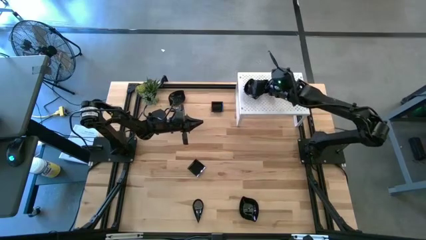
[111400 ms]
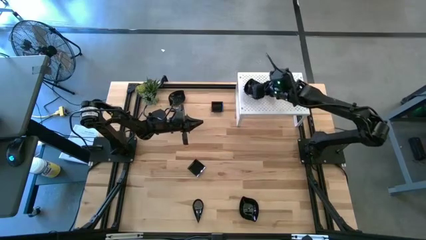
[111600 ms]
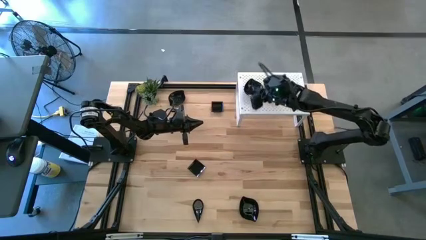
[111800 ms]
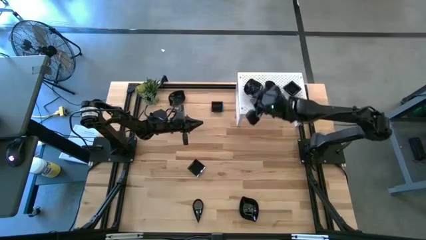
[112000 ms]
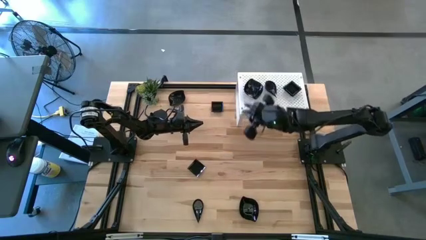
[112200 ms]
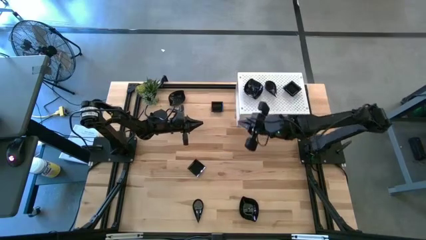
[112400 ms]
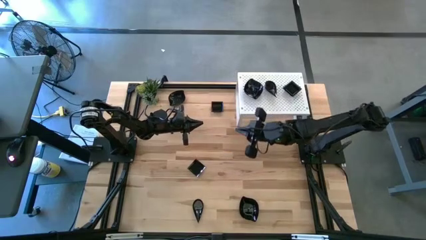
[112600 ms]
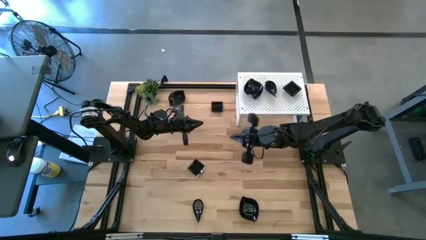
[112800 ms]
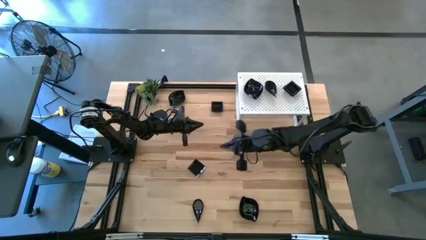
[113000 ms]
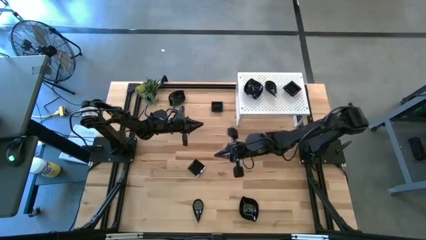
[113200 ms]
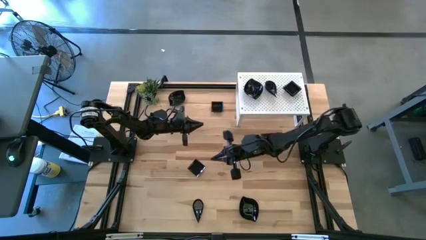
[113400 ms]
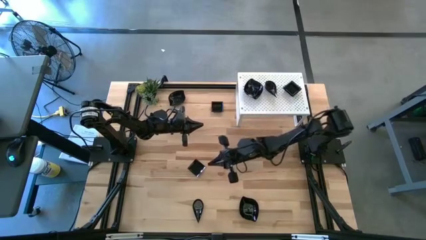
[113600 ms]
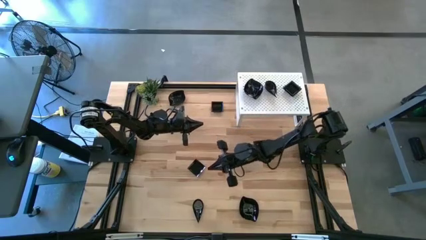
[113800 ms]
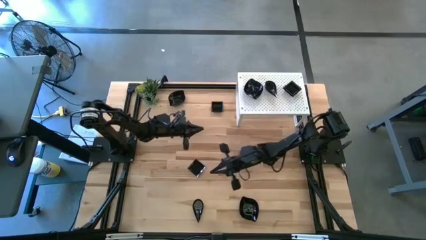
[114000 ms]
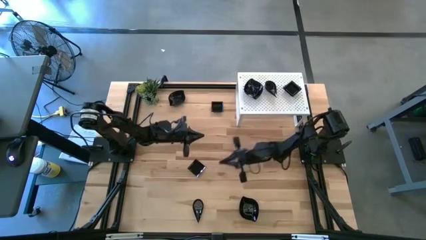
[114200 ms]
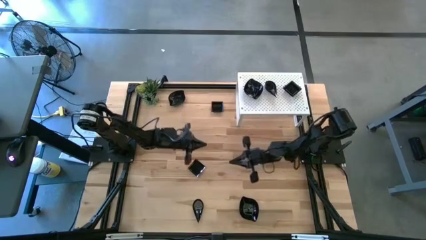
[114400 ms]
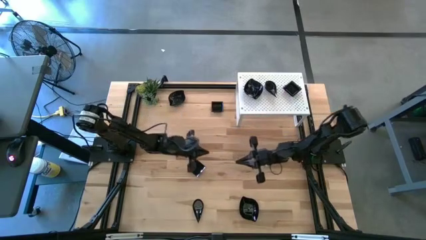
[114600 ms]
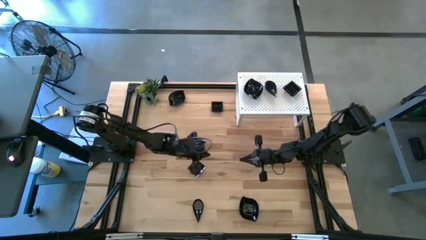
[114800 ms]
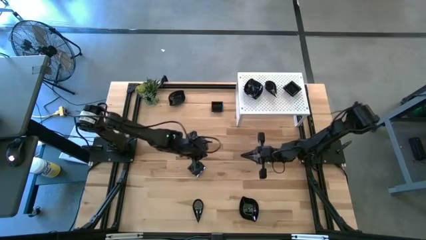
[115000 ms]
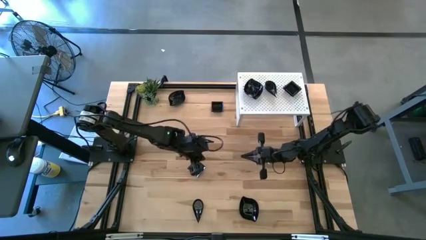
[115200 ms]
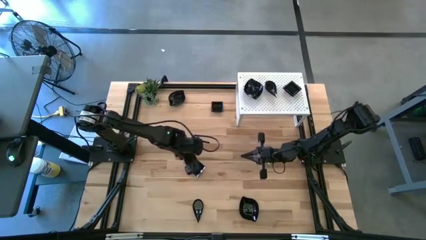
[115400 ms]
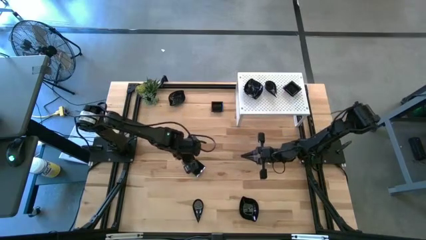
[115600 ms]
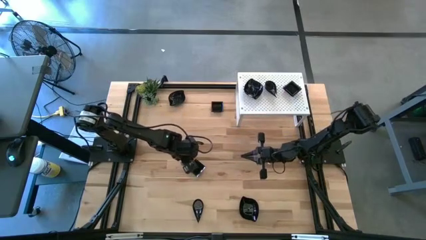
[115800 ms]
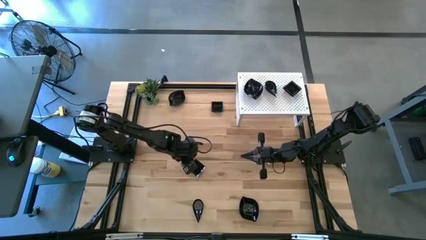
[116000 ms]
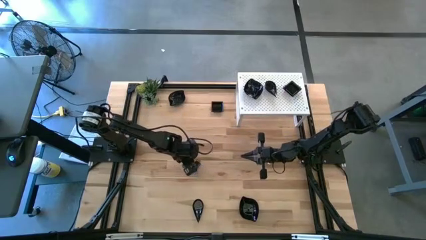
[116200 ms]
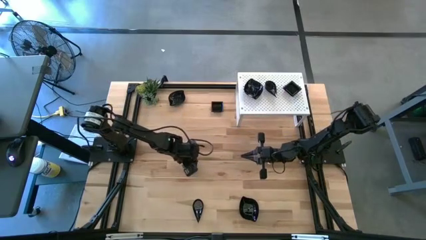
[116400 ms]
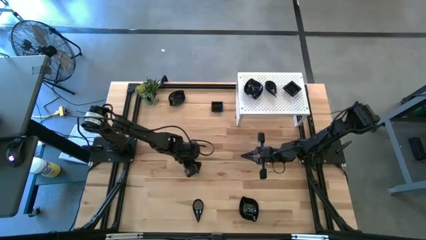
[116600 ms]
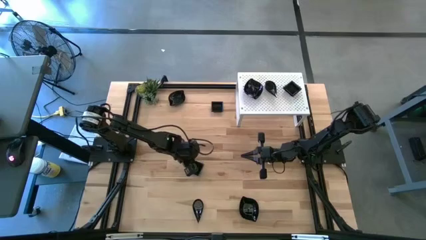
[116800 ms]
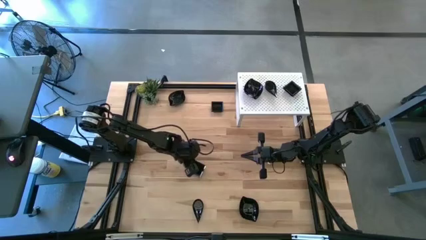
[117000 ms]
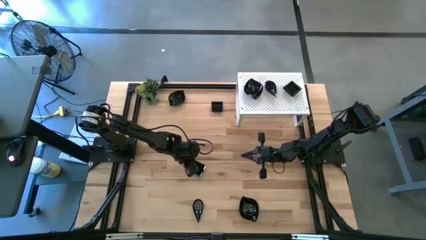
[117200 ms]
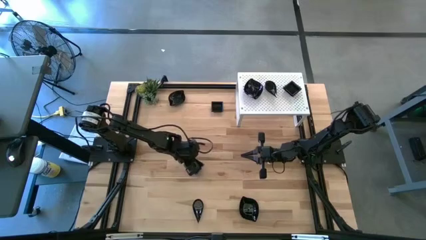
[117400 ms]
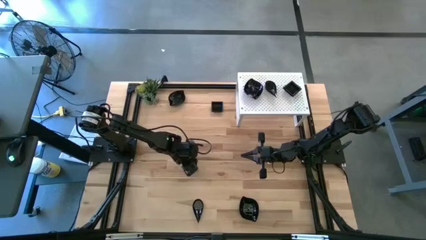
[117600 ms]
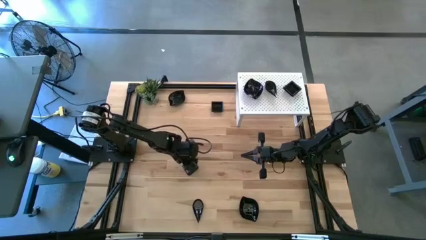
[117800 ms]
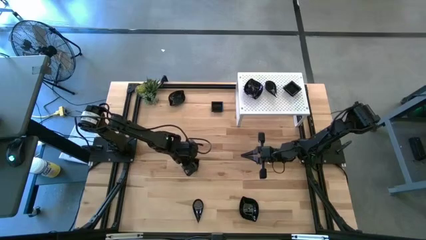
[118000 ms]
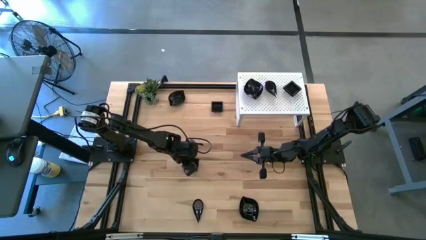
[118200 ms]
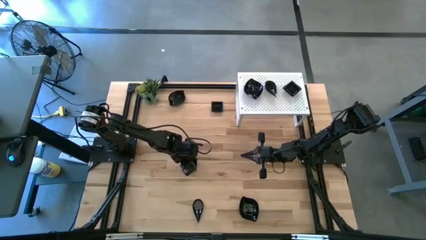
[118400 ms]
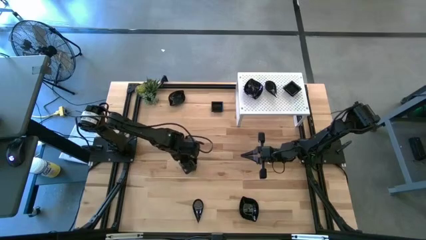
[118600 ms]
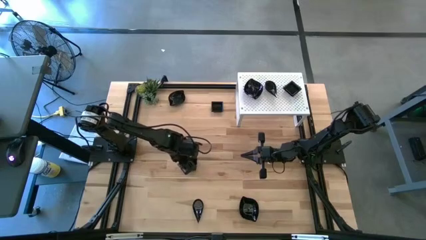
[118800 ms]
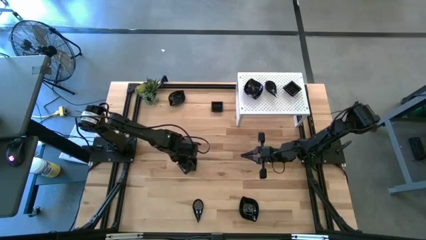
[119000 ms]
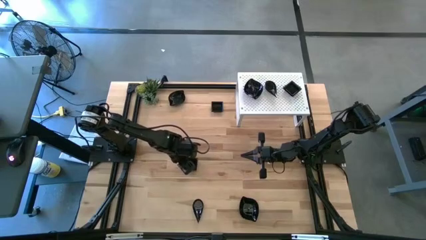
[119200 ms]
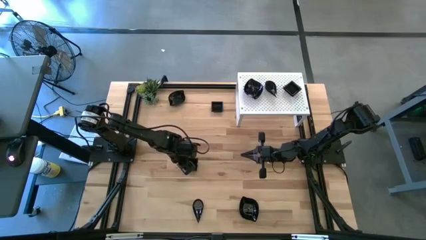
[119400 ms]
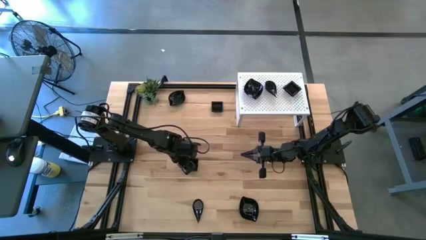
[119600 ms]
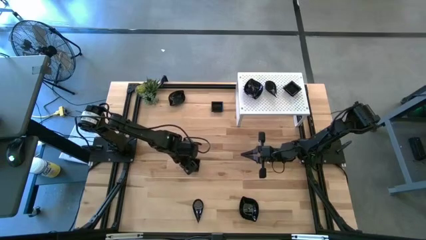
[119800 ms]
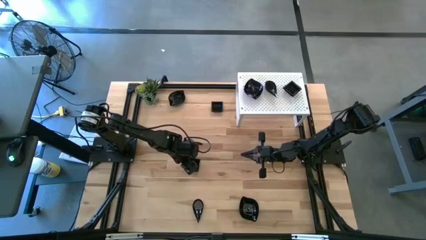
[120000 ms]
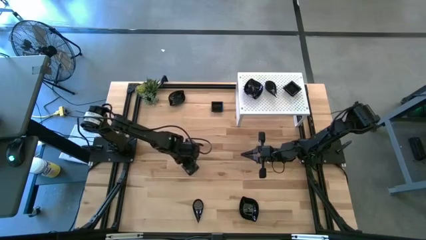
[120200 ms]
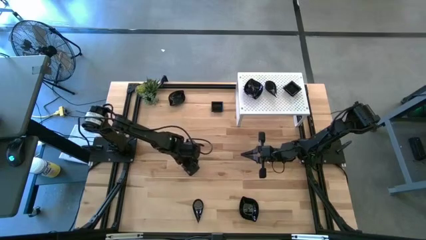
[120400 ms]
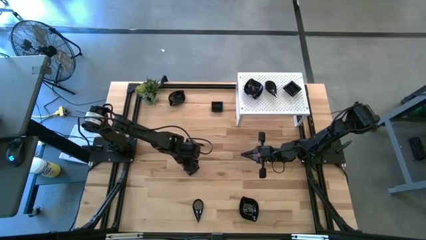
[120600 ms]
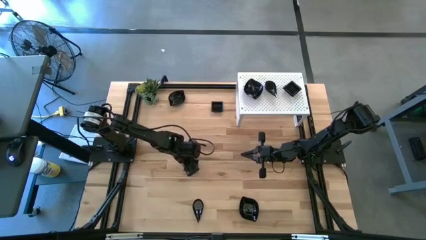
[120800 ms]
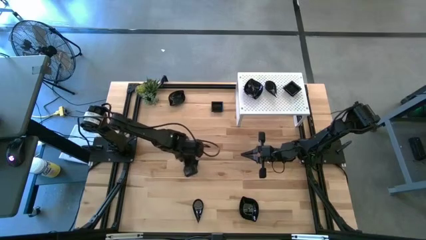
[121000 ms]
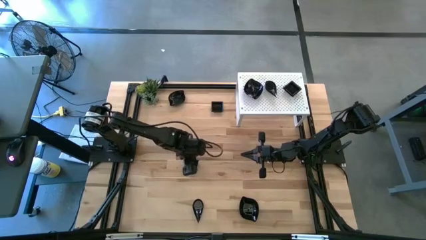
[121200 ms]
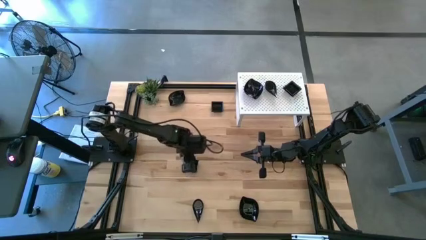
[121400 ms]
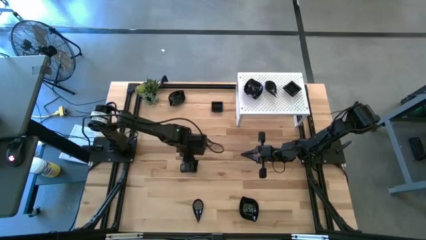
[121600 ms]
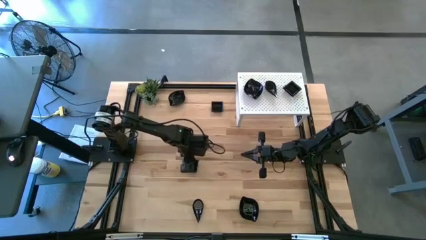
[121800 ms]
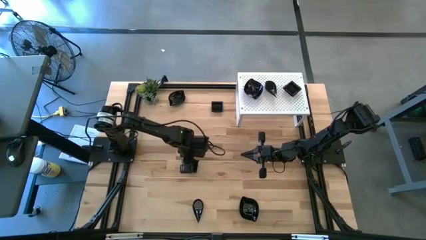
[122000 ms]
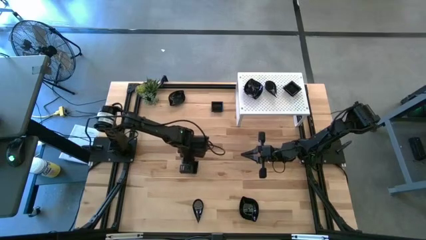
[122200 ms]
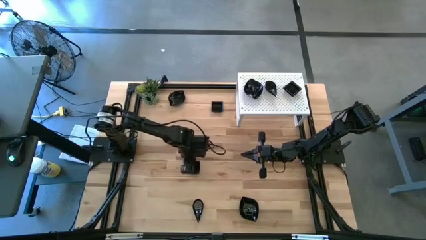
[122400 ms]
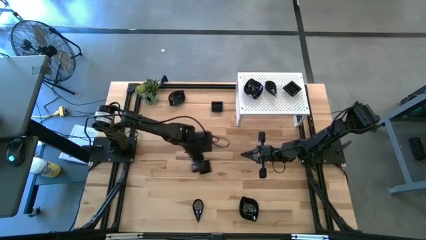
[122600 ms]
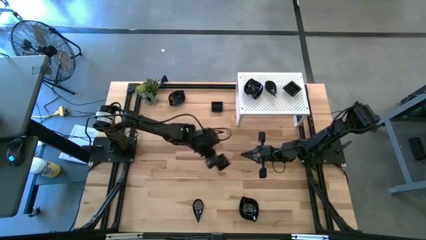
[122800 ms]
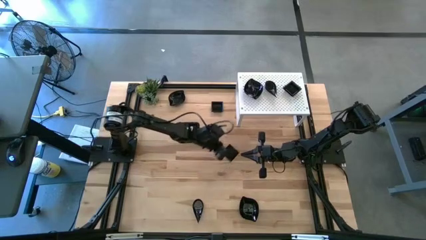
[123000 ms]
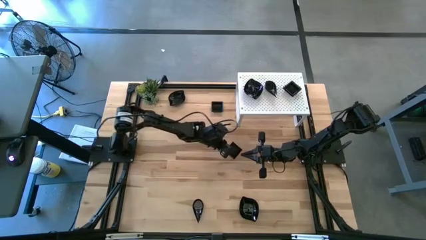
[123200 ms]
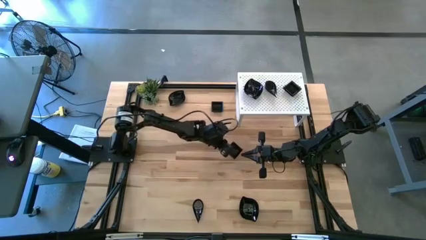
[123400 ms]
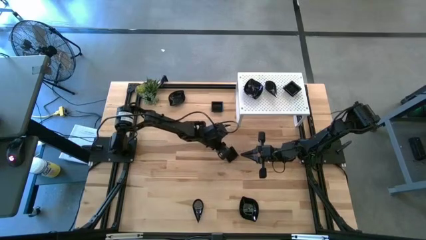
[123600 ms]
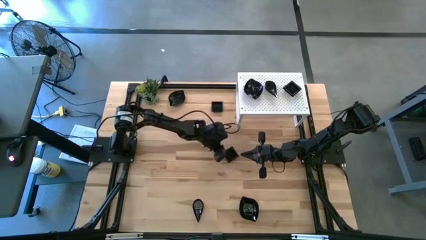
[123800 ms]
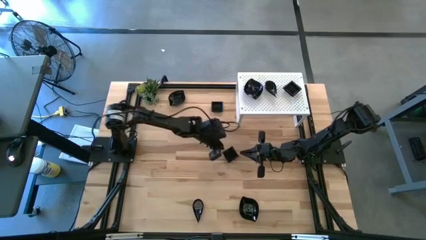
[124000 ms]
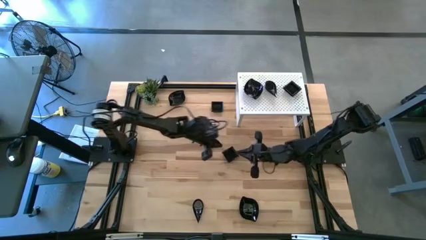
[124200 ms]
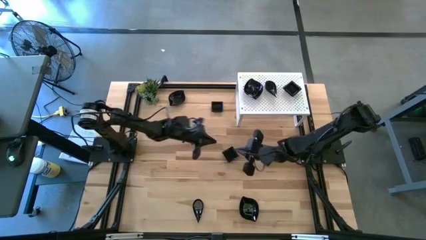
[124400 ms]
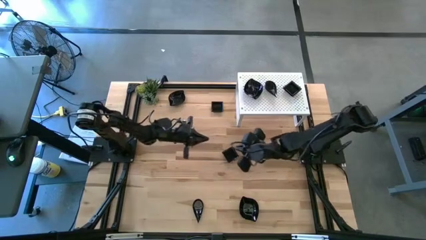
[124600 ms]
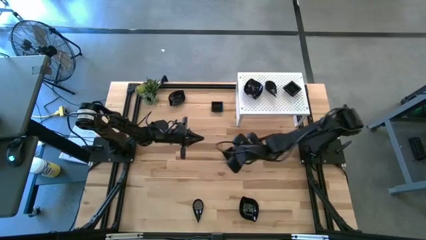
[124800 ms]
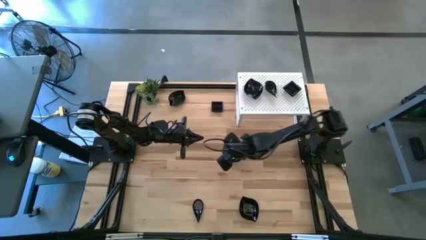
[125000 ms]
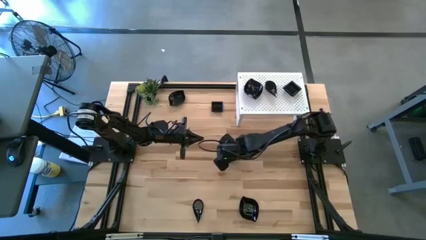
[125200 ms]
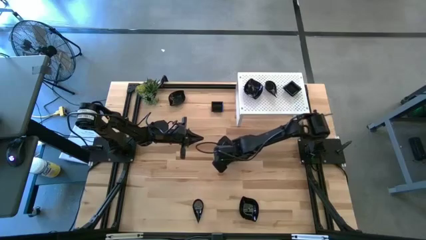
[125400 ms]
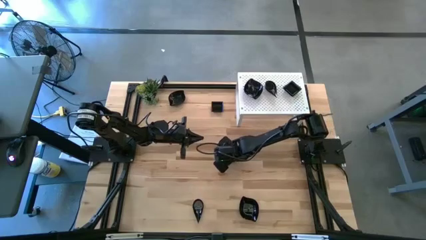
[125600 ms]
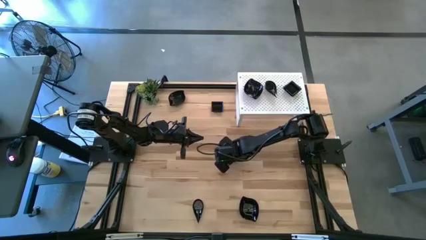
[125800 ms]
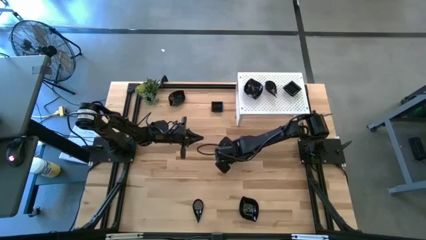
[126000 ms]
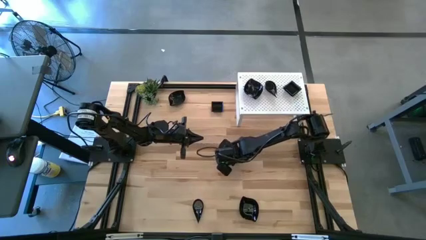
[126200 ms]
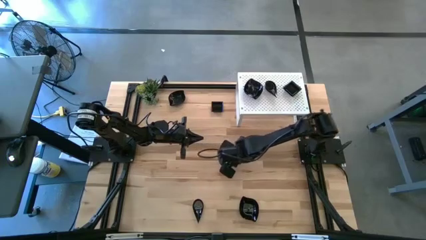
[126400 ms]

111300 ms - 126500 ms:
Task: Pick & Place Mini shaped plates
Stack the black square plate on top of the black square plates on the shelf

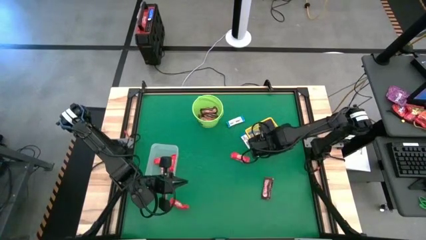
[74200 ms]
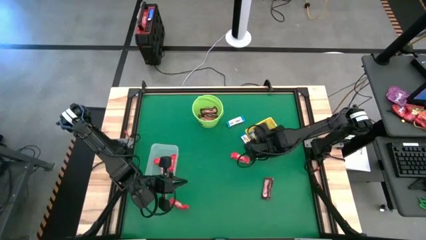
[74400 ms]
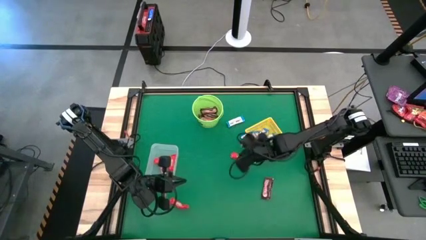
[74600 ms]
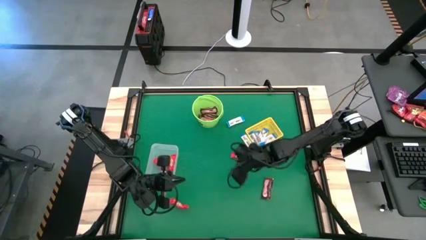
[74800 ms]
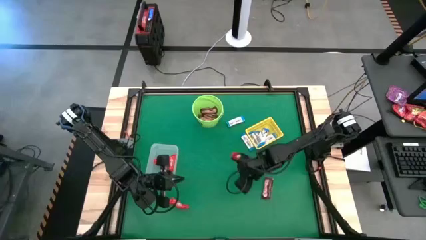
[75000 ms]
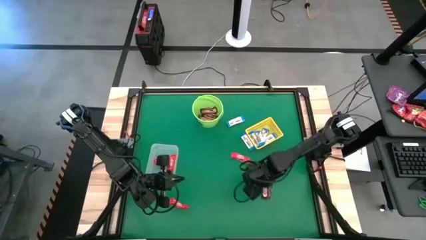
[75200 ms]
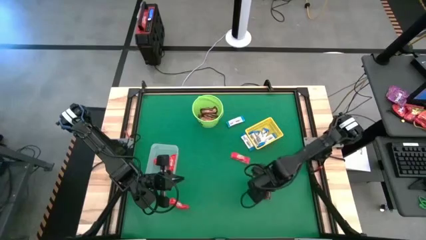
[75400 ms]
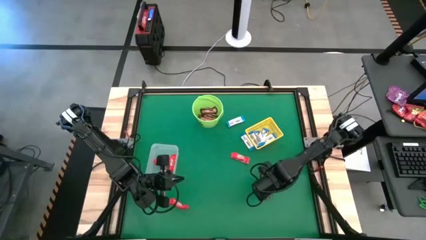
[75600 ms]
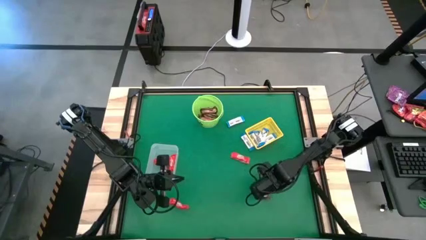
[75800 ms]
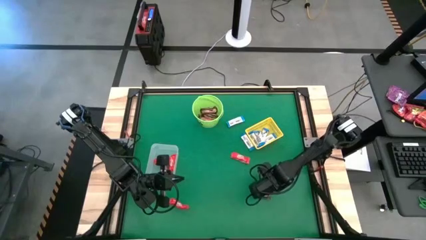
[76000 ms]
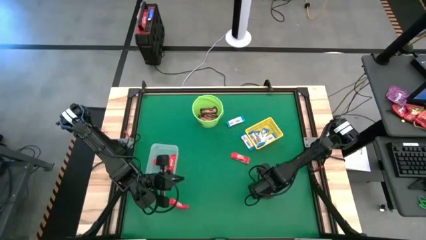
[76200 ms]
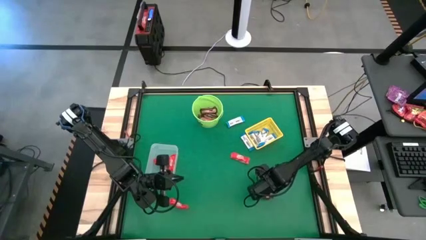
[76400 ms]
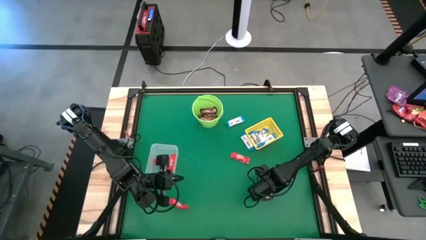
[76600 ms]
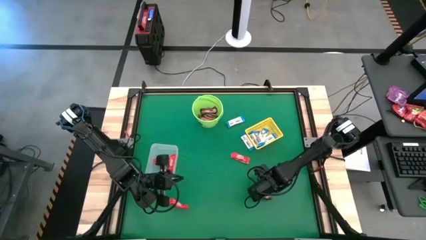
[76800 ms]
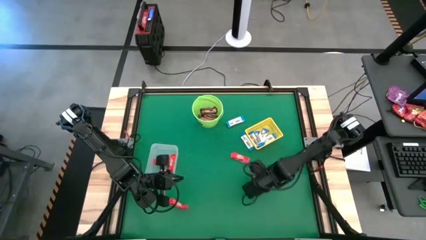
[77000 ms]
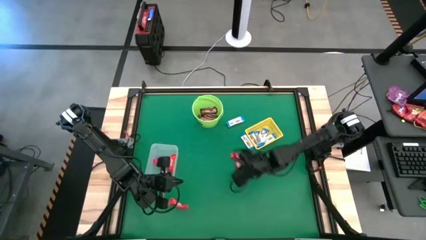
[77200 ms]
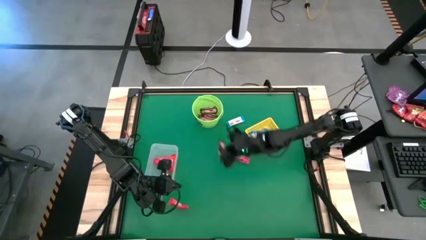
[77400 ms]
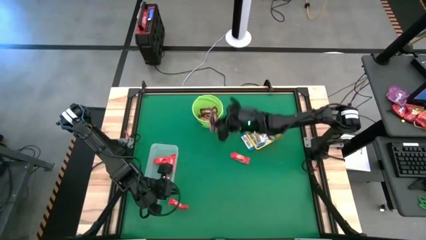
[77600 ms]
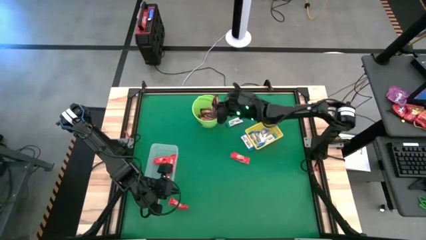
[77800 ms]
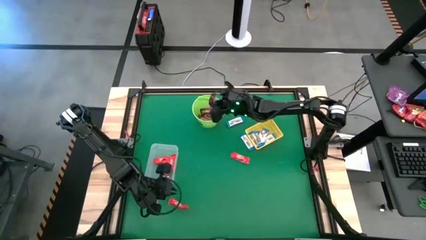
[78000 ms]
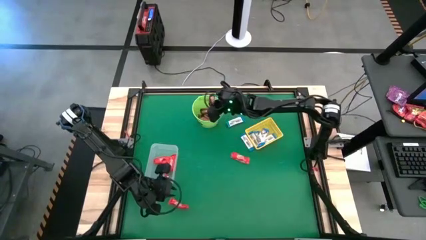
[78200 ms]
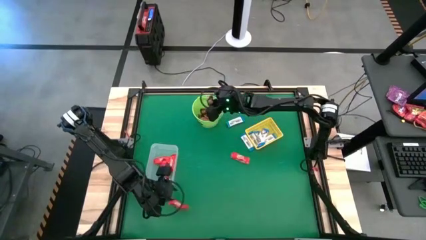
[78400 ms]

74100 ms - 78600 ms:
Task: Sort candy by brand, put in halloween buckets
Put the brown chocolate bar into the green bucket
